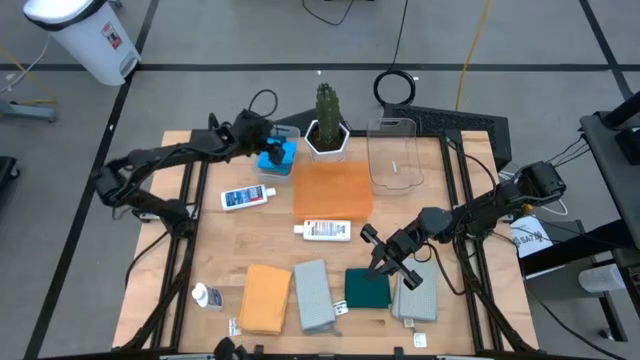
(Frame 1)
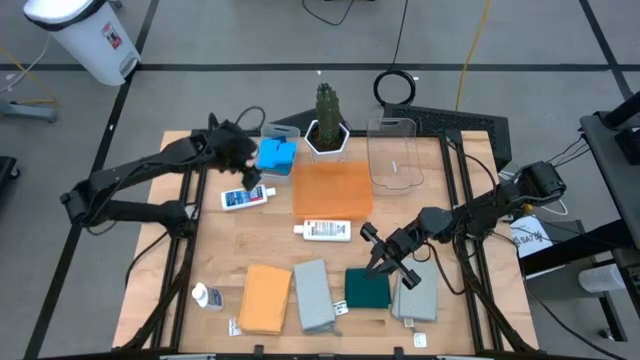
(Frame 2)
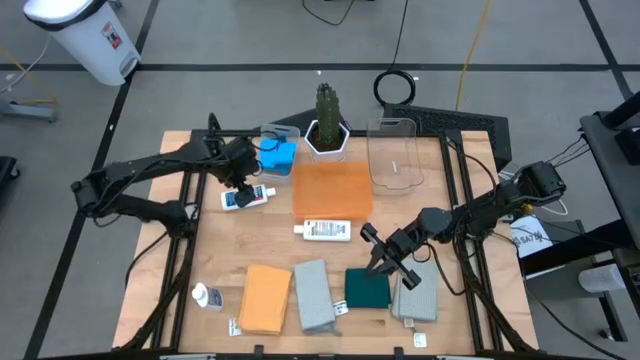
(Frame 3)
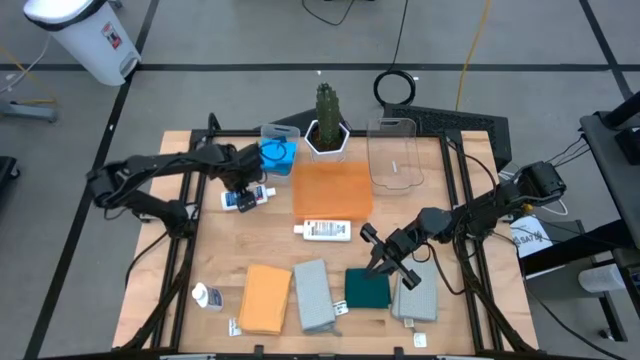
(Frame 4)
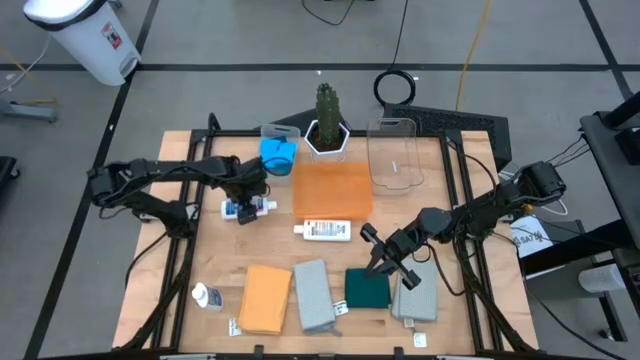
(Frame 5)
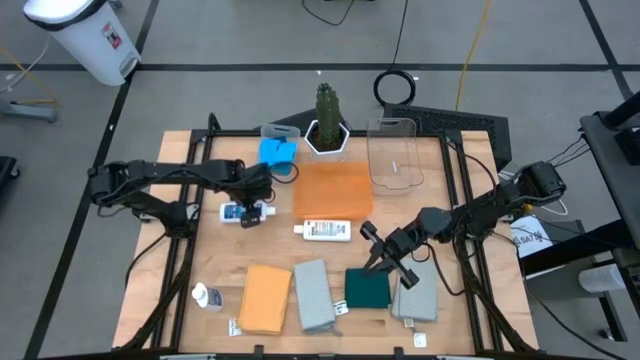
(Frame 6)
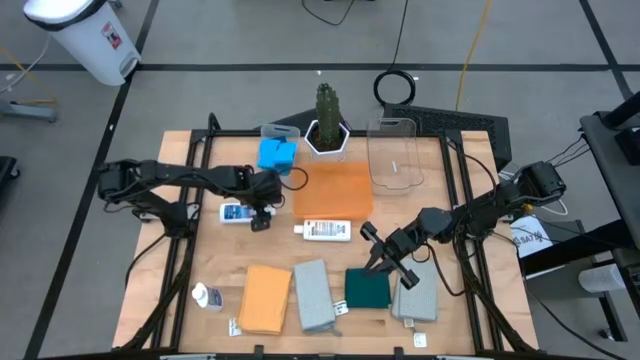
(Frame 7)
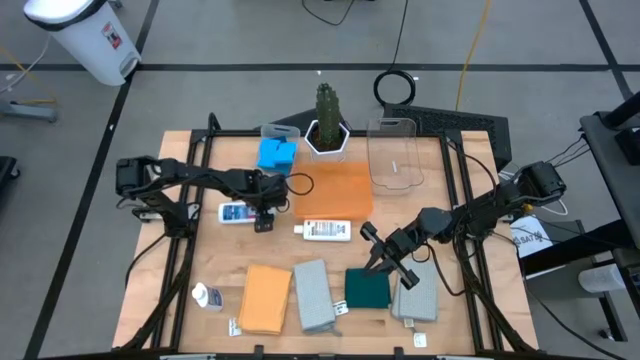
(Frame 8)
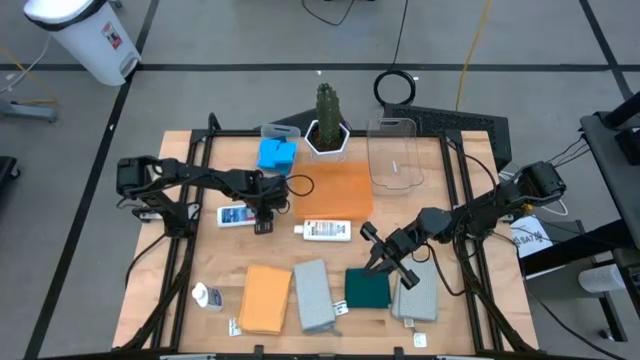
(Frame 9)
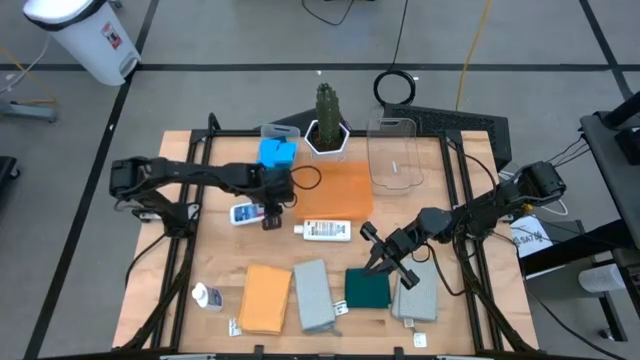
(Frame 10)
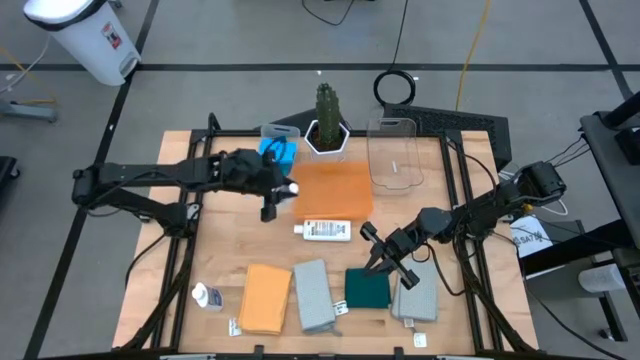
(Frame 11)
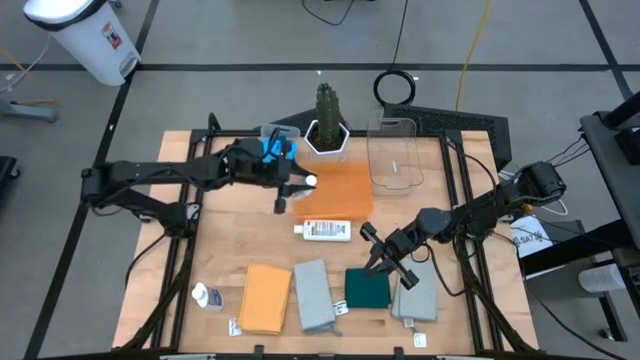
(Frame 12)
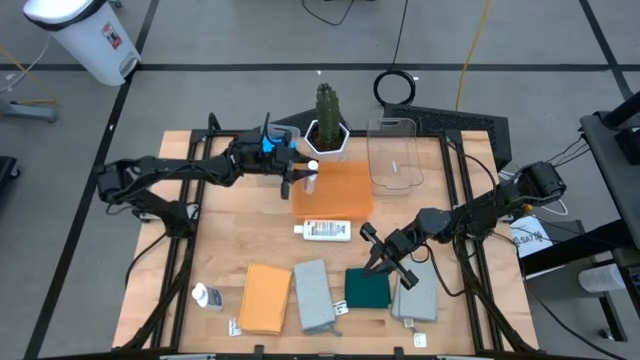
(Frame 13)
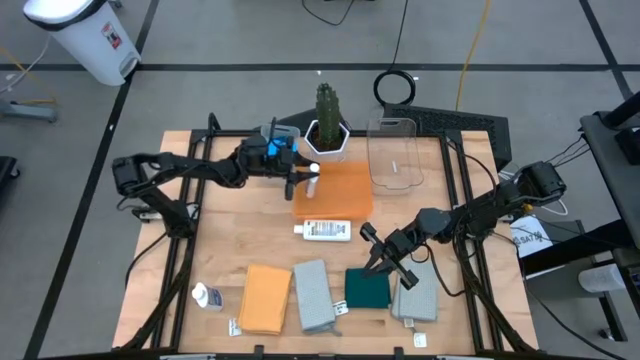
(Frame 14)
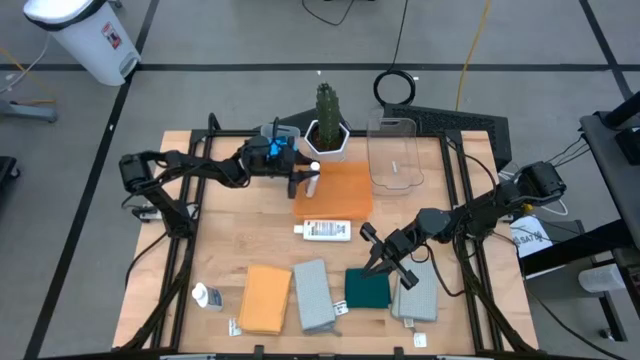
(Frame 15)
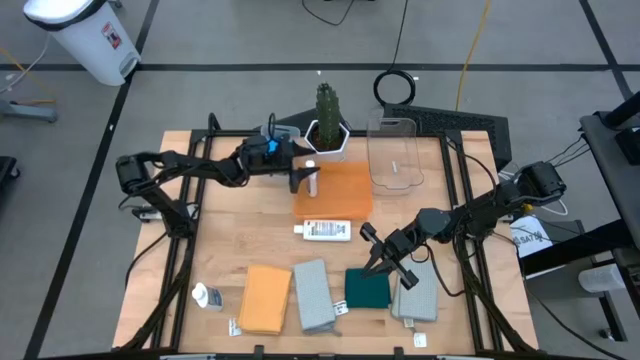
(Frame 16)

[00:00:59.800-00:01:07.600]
Task: Pick & Place Kitchen Items
Put the white plastic restorer bottle into the orange bin

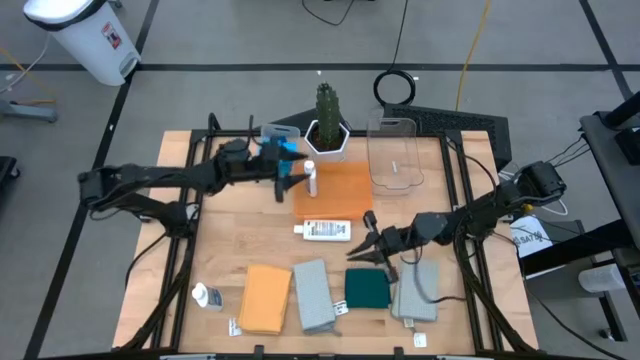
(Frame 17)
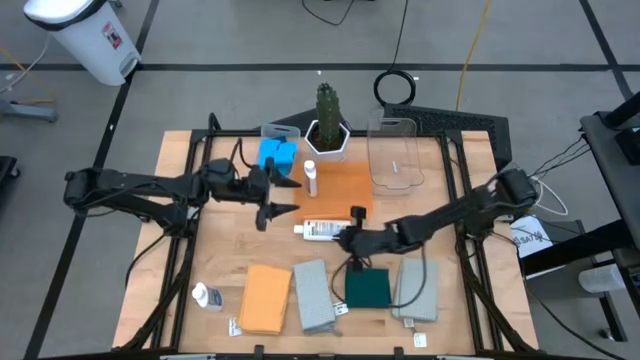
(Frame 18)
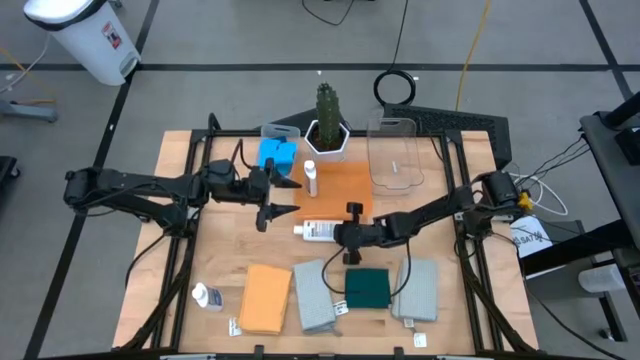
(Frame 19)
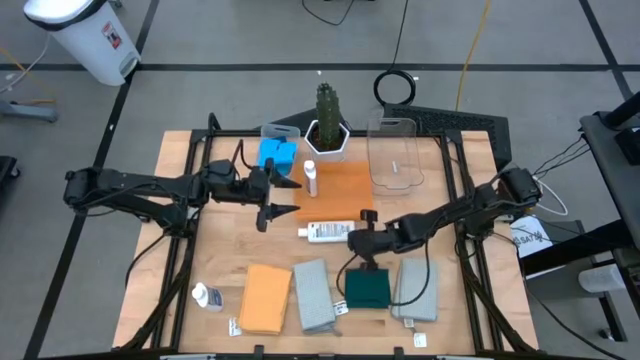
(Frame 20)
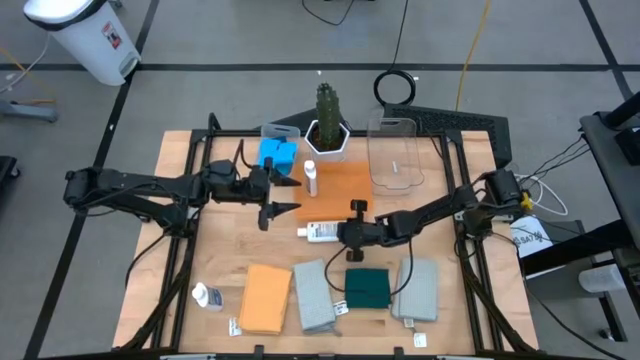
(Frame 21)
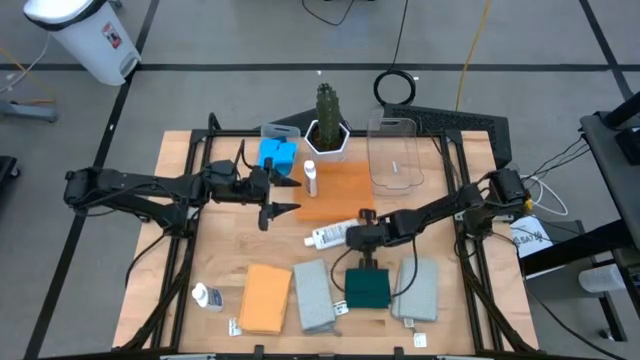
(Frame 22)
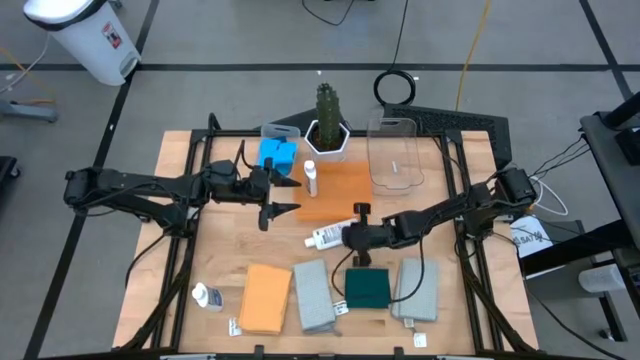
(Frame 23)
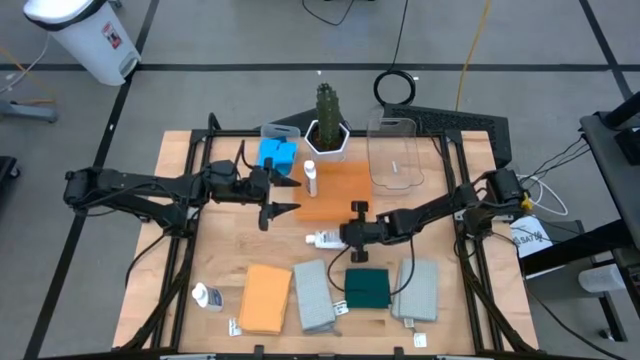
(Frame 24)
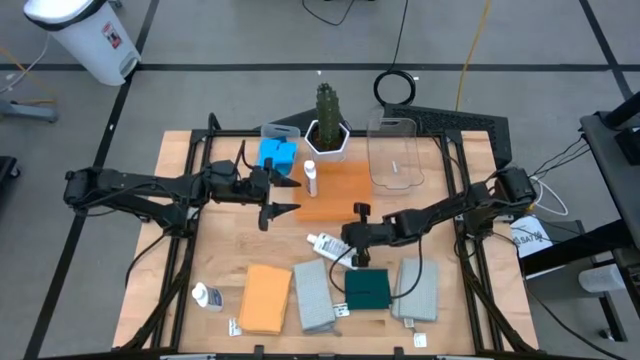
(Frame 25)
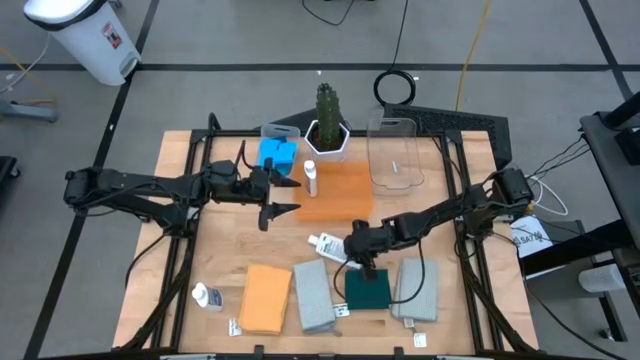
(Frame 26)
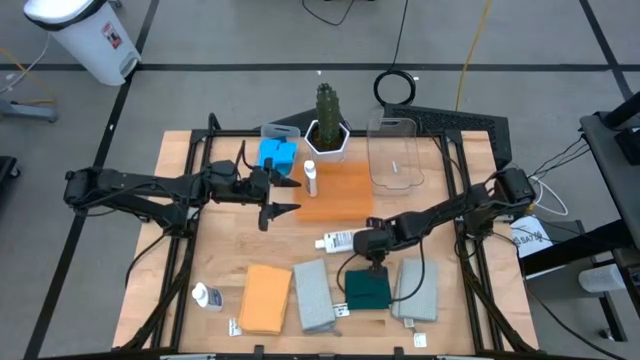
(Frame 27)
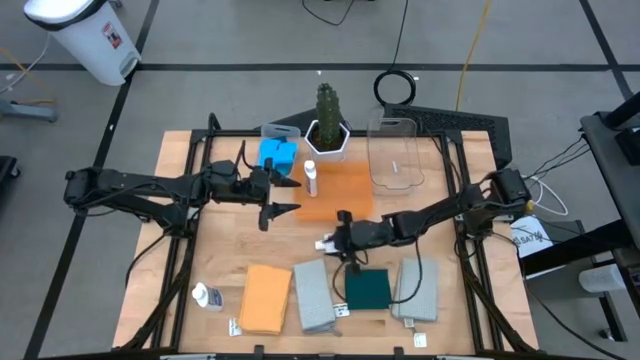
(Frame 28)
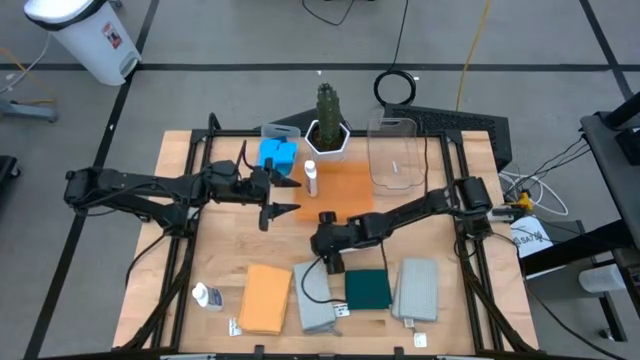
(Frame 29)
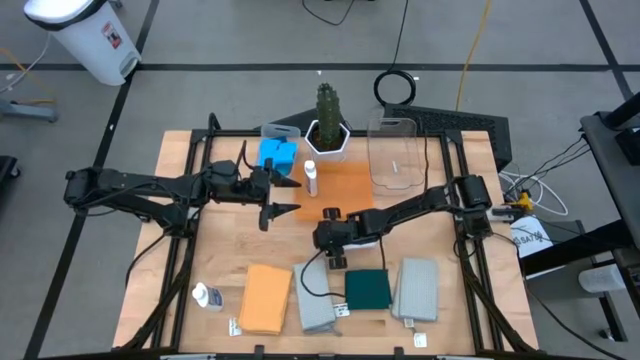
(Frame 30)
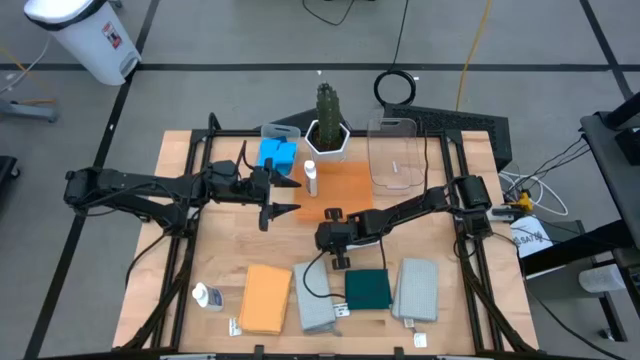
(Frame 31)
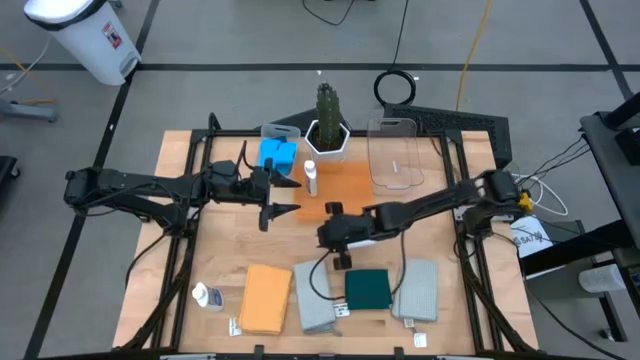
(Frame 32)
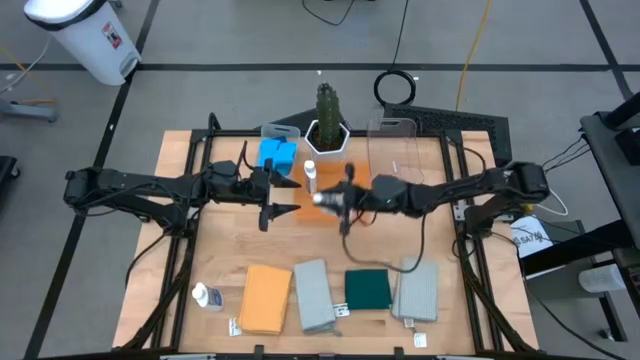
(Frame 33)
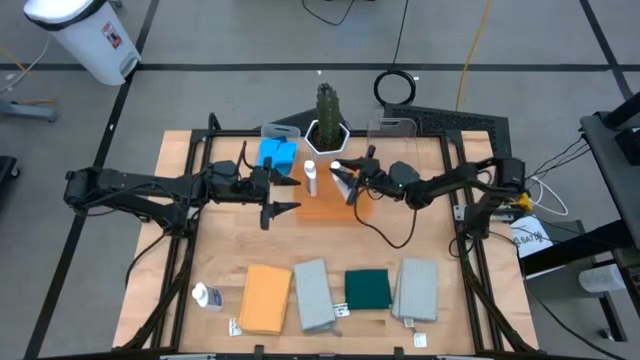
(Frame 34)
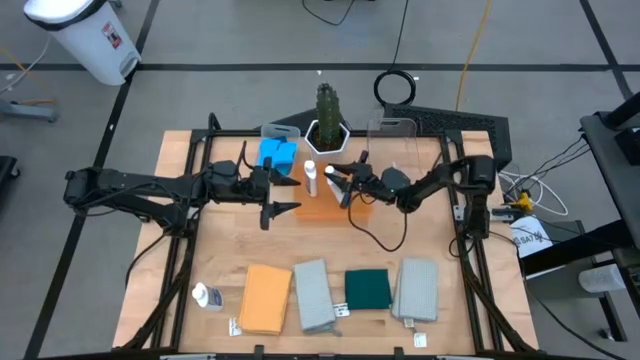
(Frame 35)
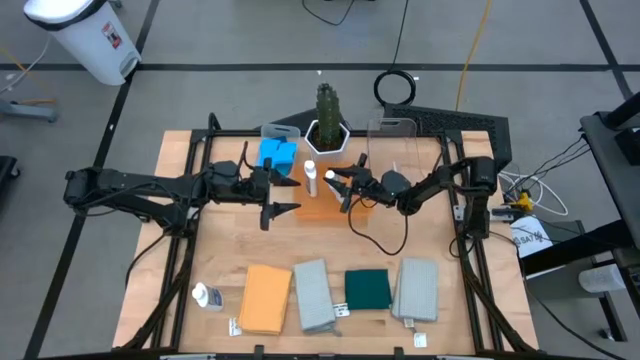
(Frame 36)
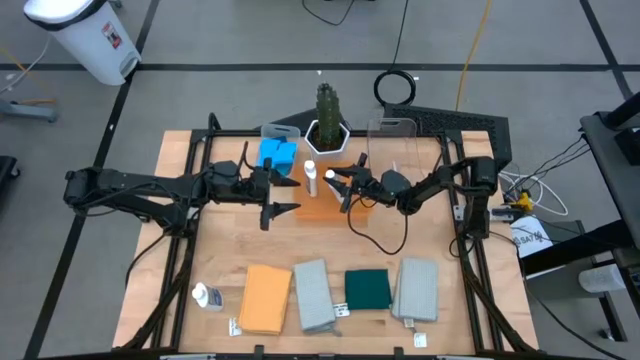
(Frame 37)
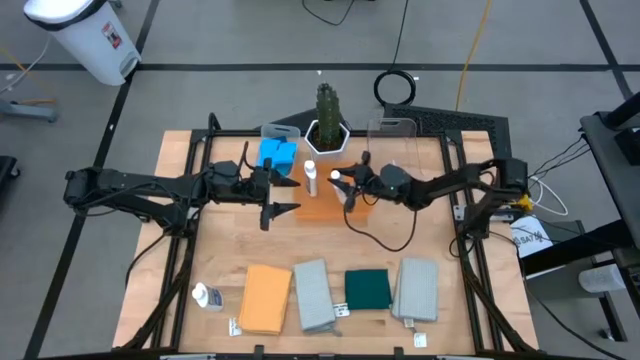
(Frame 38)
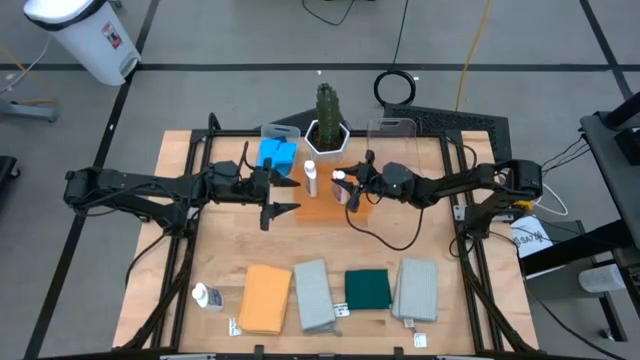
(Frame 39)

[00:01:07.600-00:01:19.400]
Put the white plastic restorer bottle into the orange bin

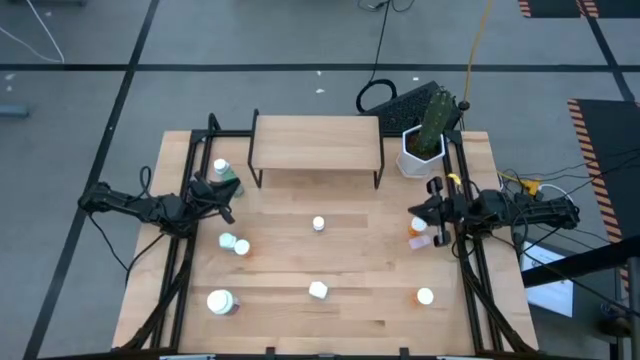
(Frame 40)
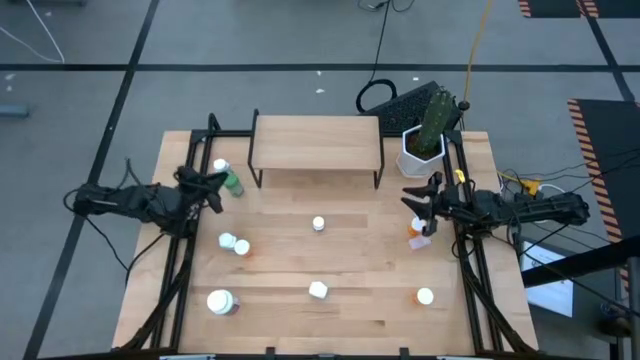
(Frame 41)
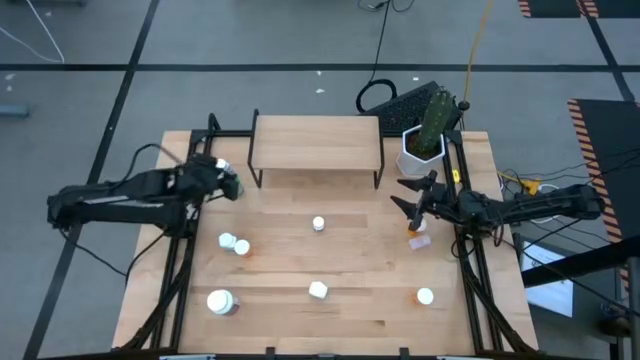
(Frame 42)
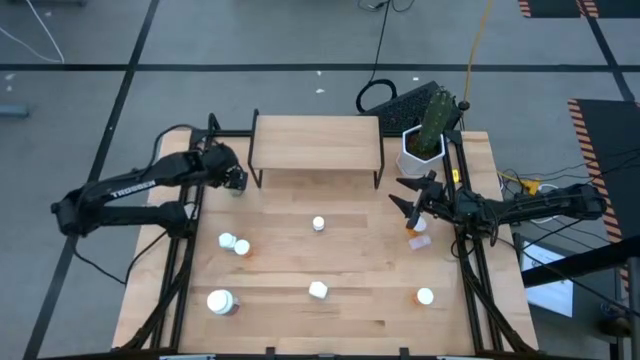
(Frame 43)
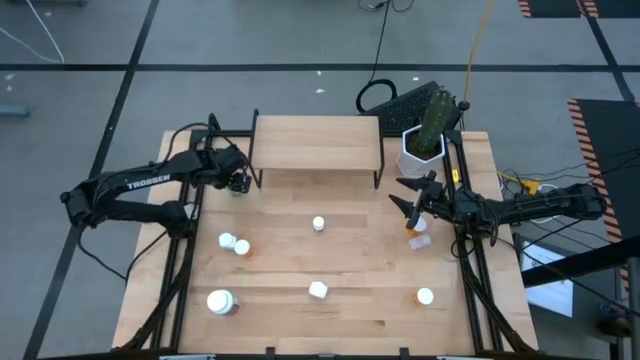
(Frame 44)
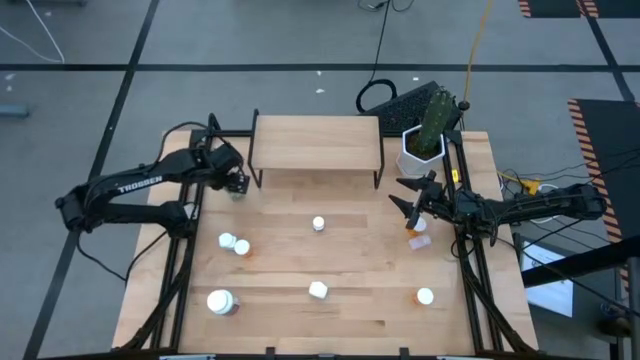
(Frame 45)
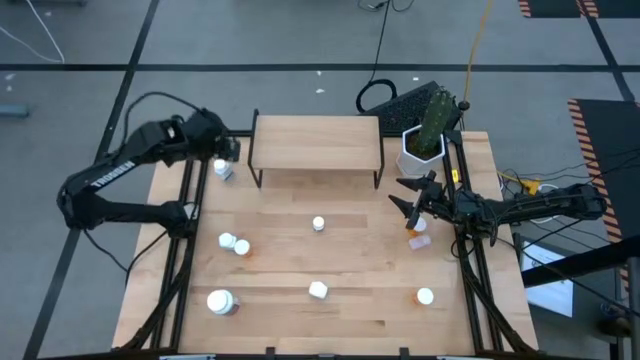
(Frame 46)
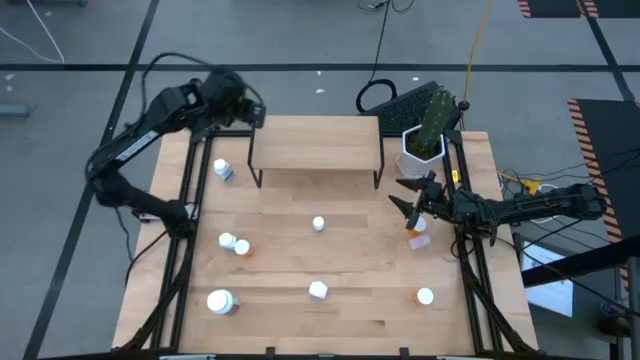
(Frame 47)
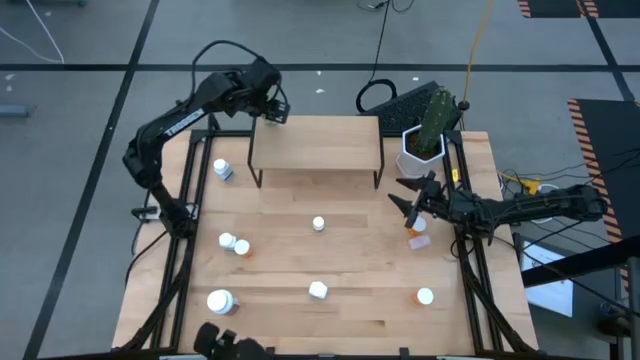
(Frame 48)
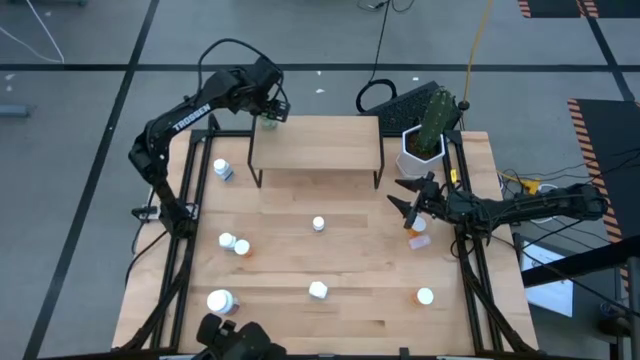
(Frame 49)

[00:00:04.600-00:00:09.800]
Task: Pick and place medicine bottles onto shelf by color
Put the green medicine bottle on the shelf
